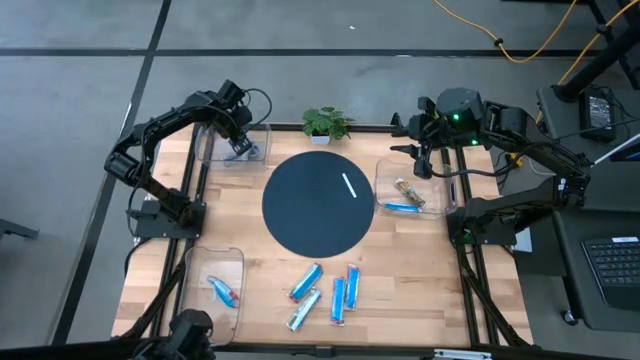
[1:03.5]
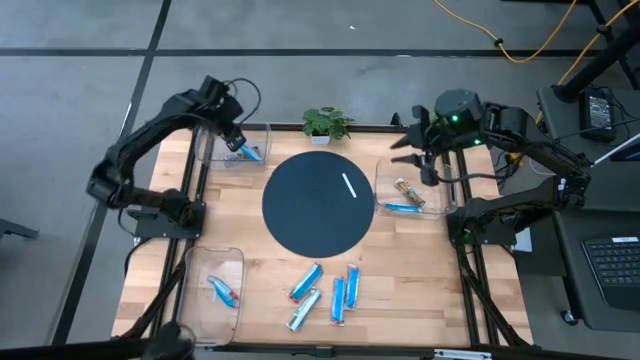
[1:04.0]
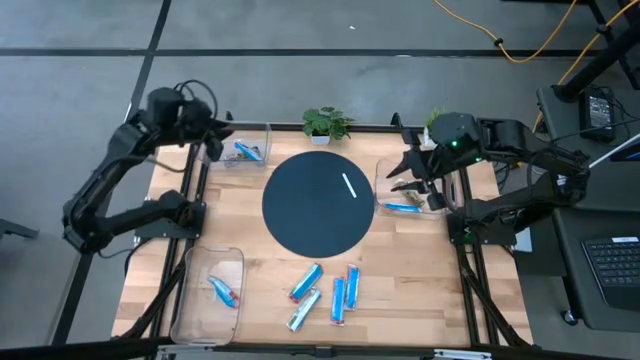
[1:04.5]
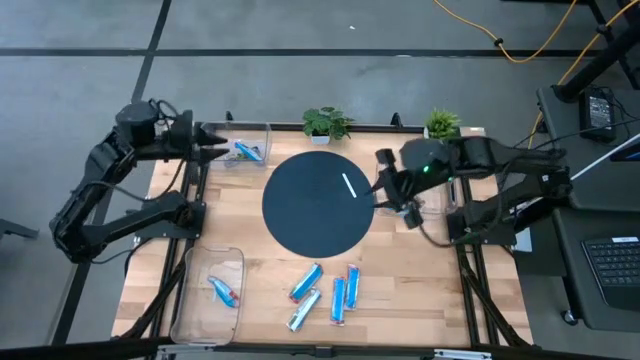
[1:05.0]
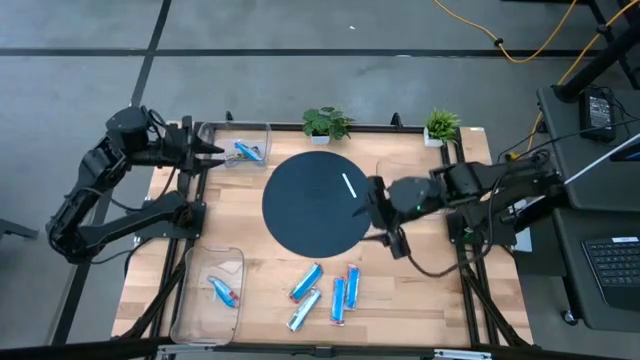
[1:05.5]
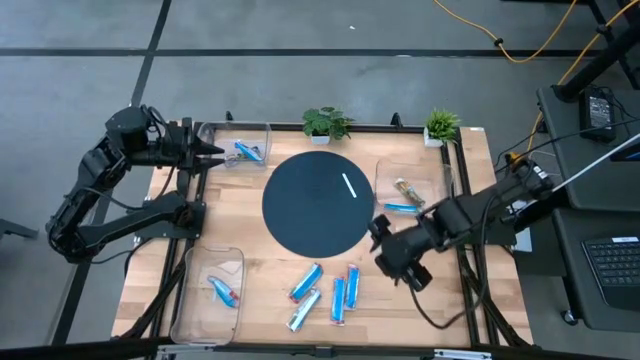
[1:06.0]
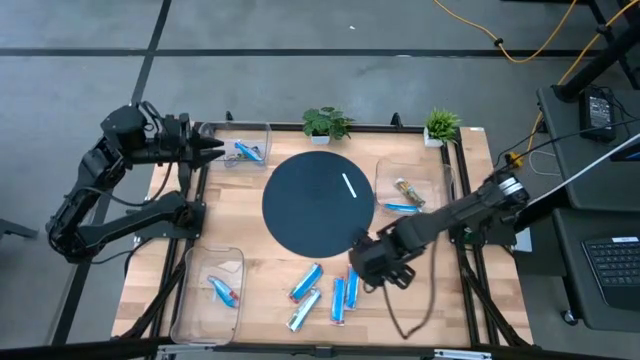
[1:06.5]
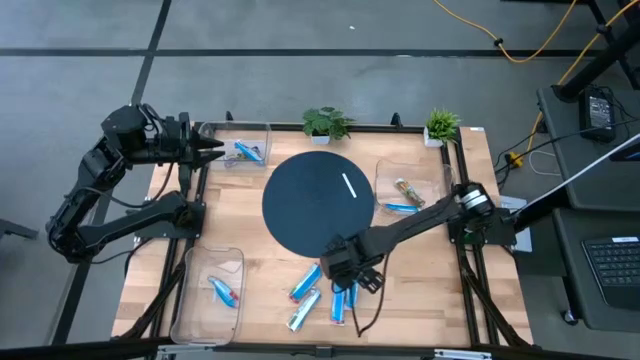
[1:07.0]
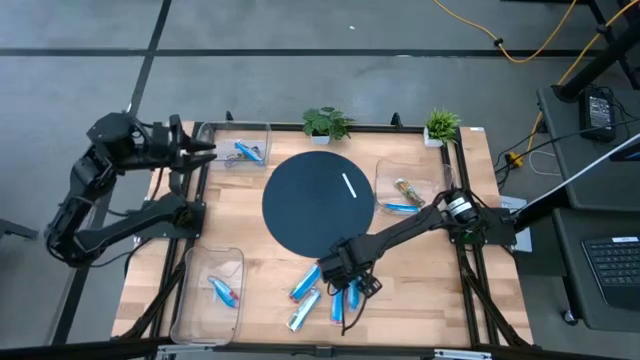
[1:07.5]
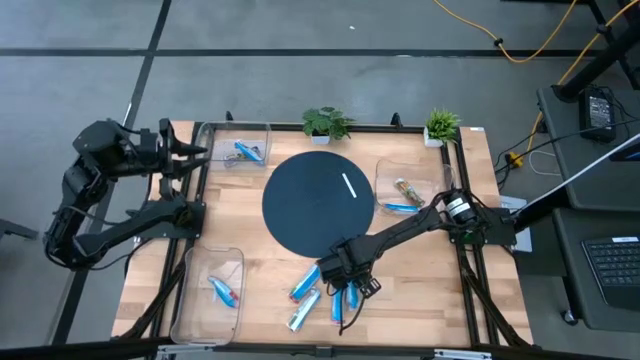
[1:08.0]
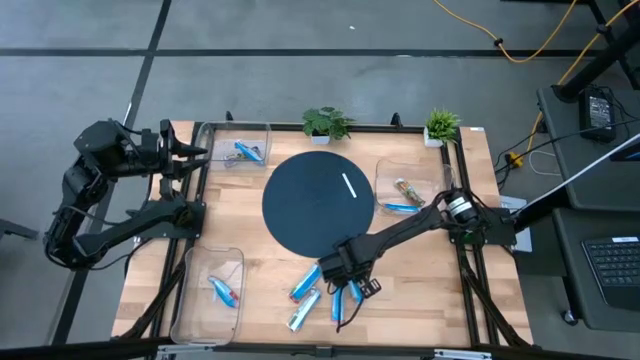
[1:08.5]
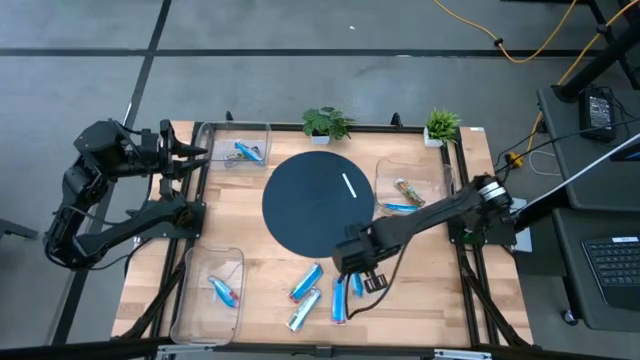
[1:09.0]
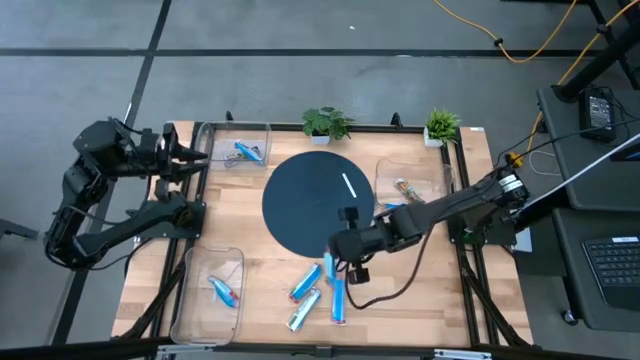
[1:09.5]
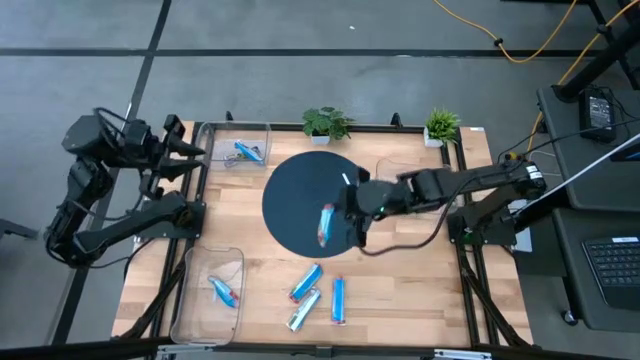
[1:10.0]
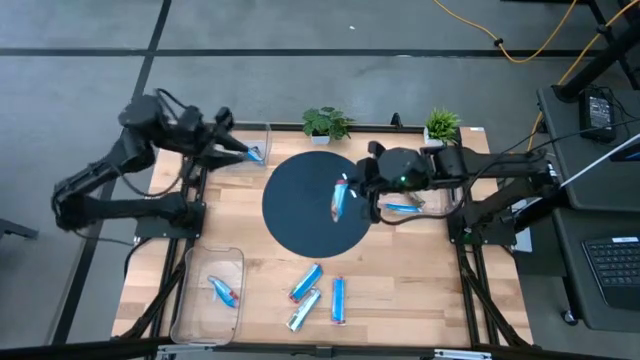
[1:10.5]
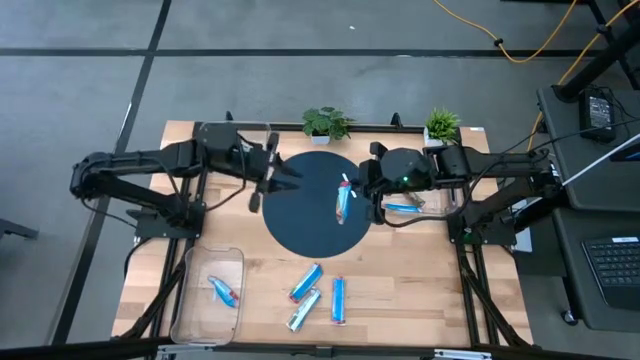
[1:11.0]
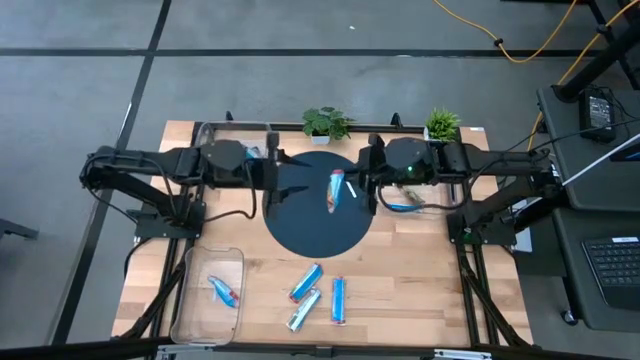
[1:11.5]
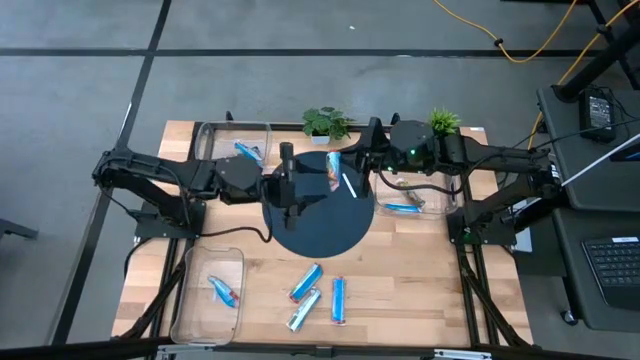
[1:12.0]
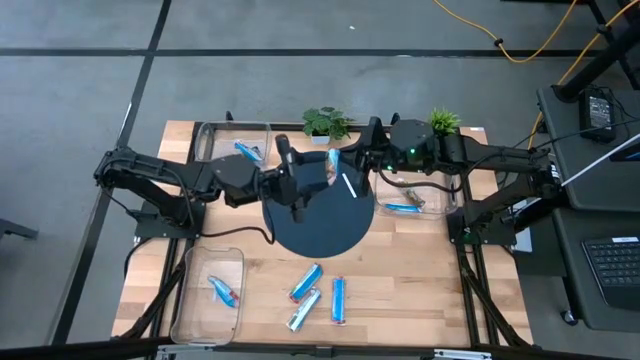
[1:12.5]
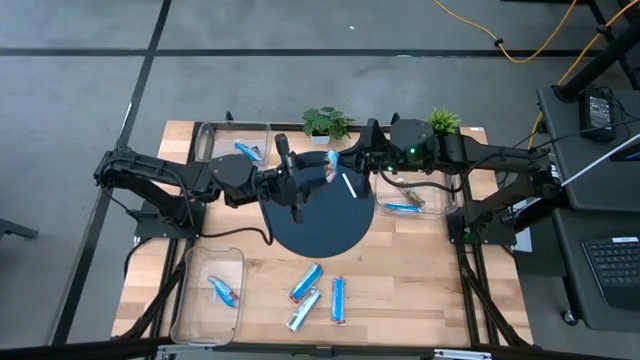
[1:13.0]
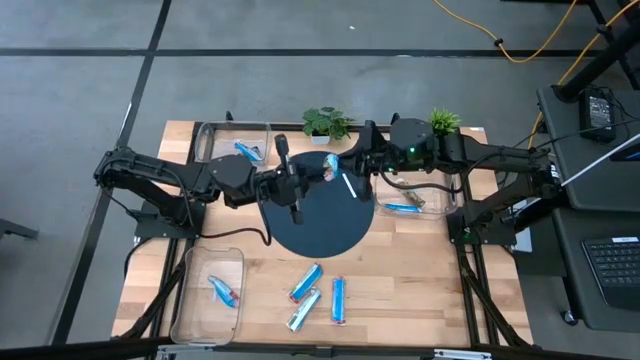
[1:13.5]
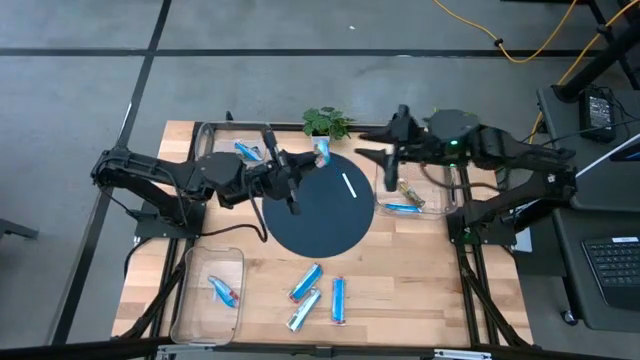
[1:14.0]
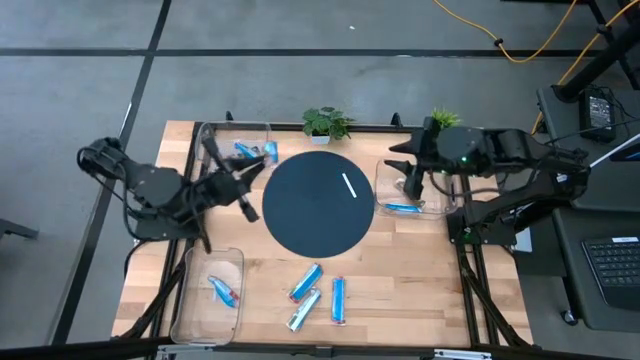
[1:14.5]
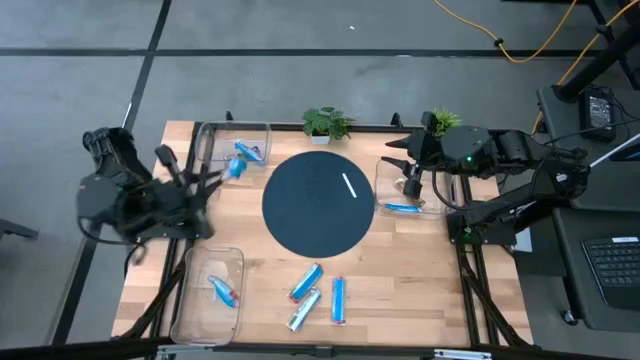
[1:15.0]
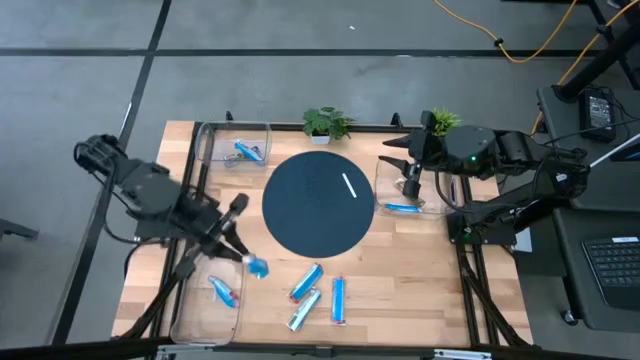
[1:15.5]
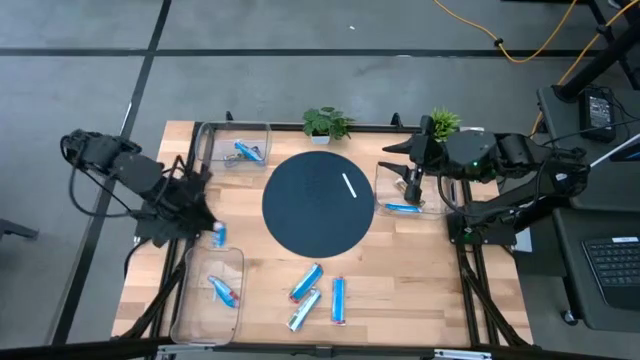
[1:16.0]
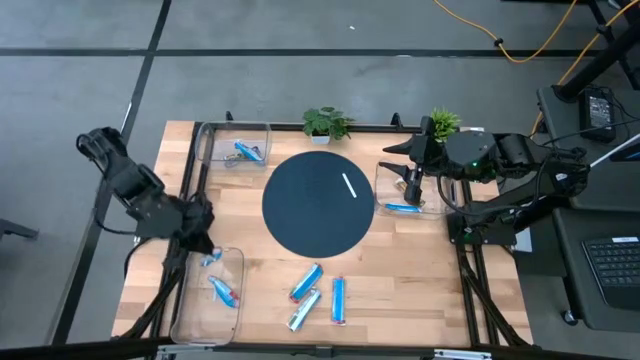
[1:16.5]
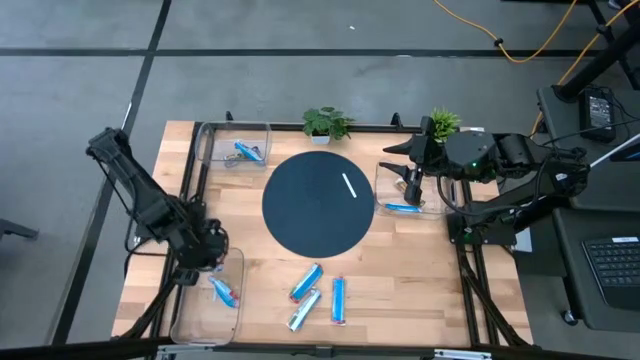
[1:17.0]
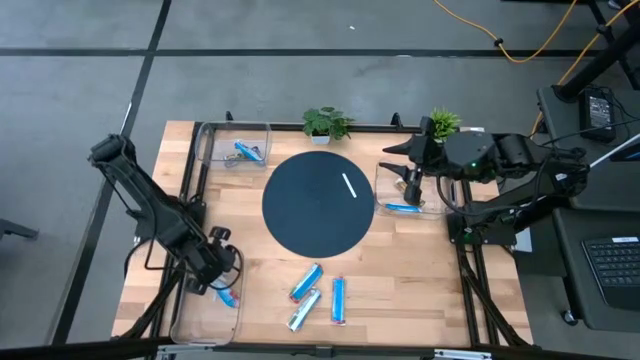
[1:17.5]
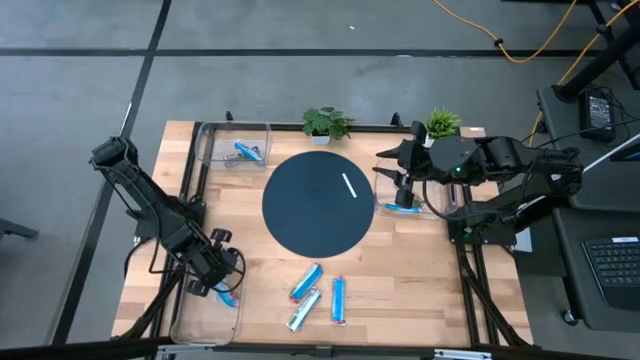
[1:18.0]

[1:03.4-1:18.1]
Task: Pick and place Granola Bars by type
Put the red granola bar into the bottom transparent bin

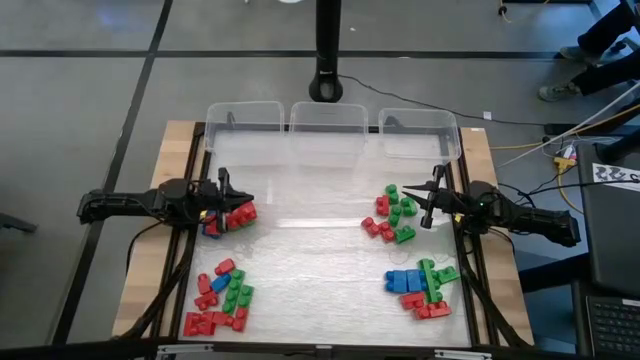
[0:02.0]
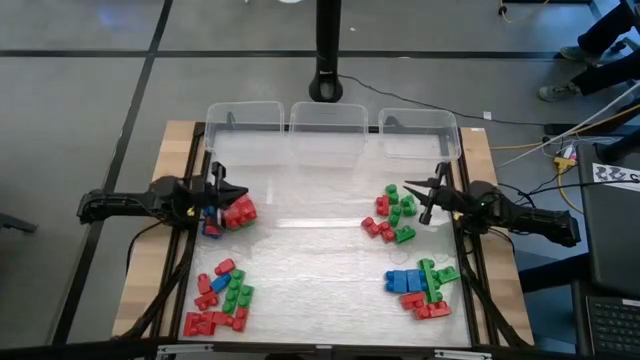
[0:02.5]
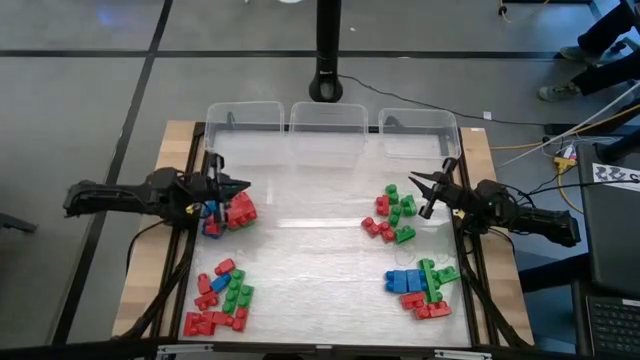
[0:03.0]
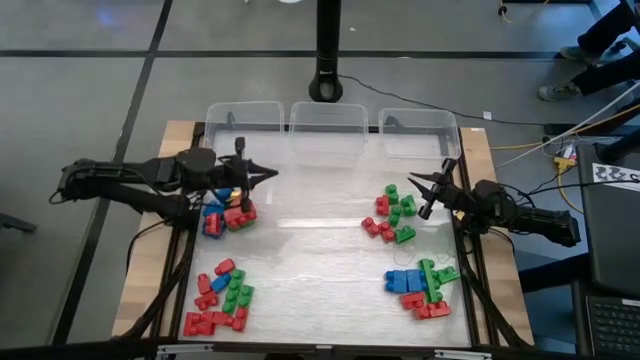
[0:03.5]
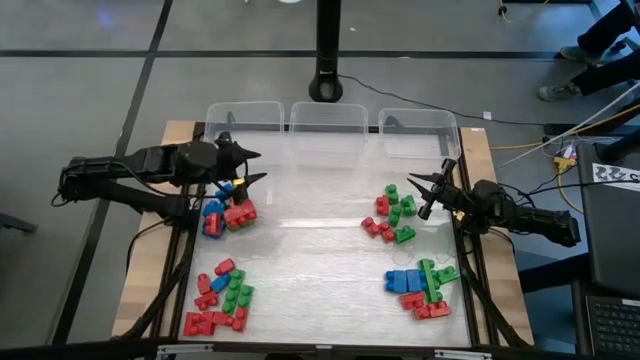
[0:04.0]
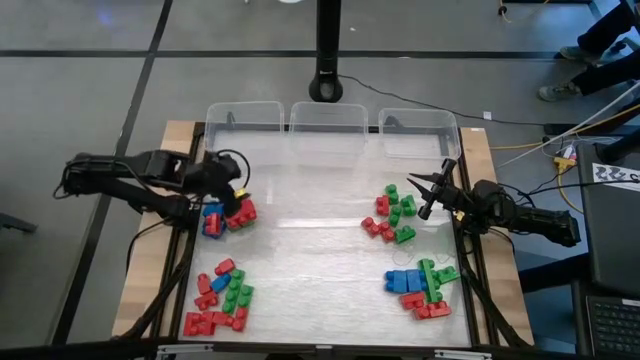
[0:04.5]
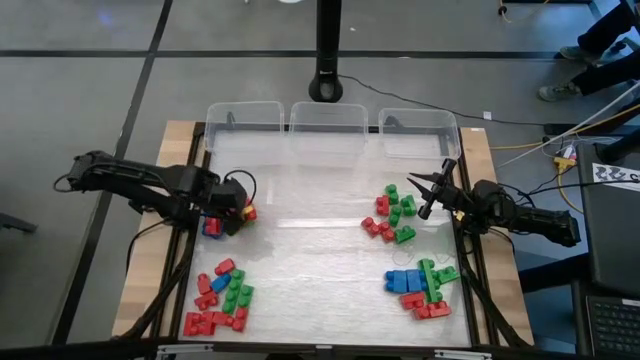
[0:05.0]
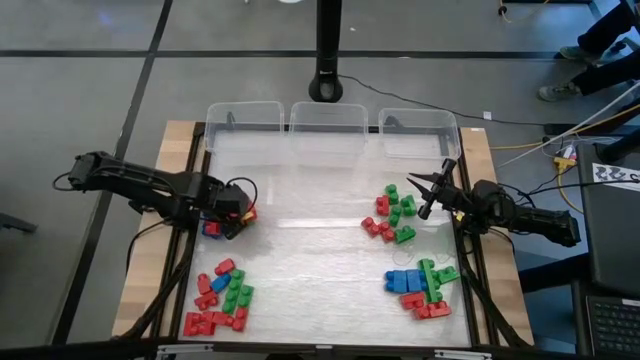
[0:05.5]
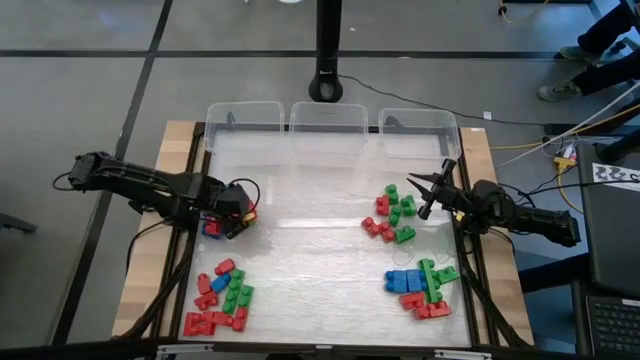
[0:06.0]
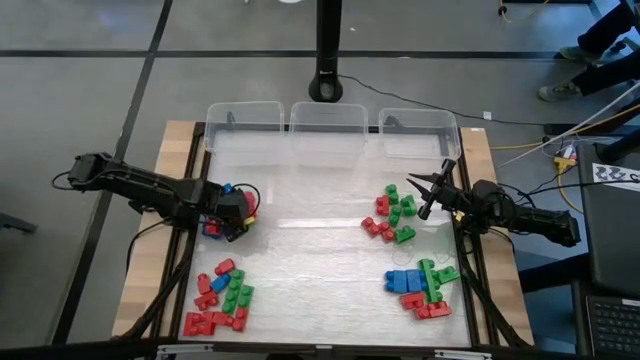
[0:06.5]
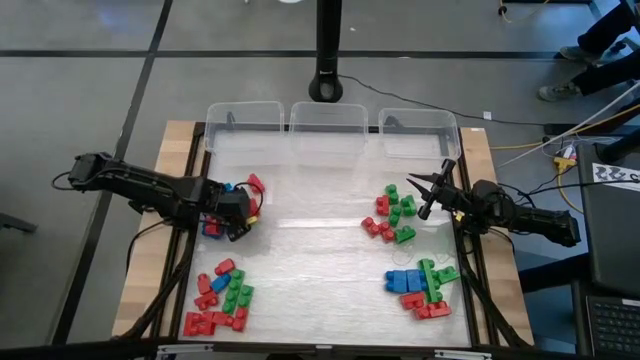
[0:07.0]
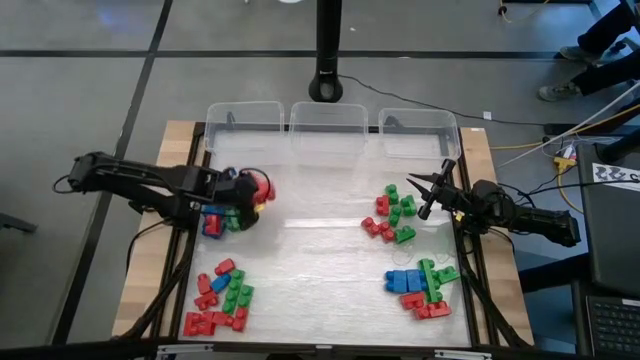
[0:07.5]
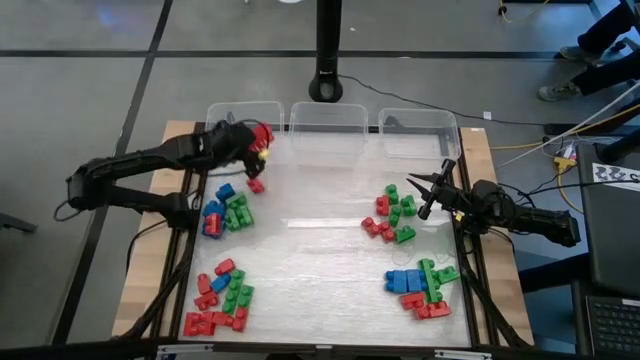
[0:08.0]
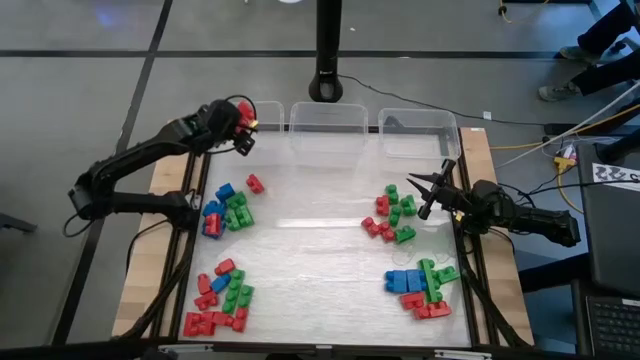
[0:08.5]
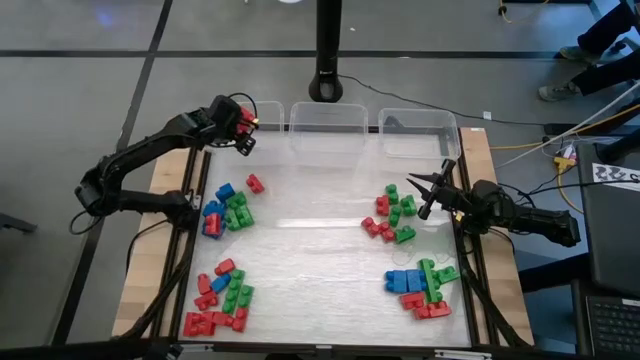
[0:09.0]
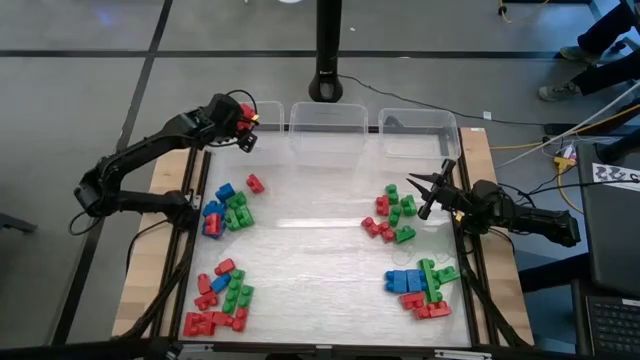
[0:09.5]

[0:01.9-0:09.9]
Task: Sort blocks
Put the red game piece into the left transparent bin
